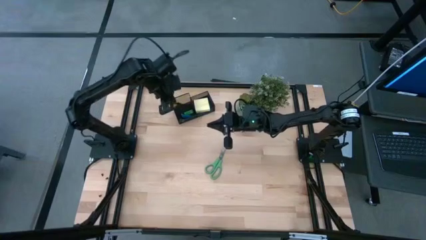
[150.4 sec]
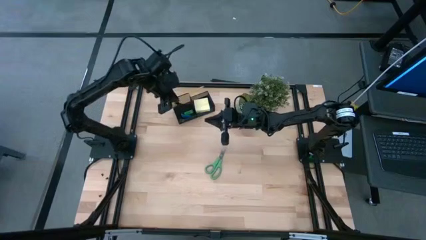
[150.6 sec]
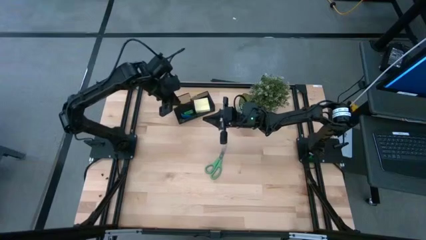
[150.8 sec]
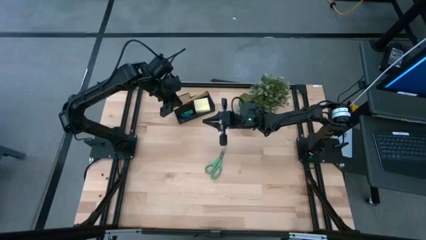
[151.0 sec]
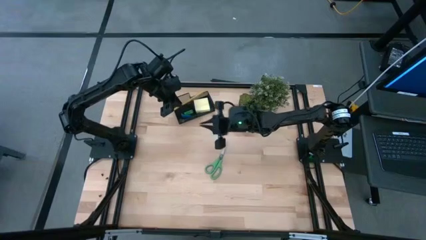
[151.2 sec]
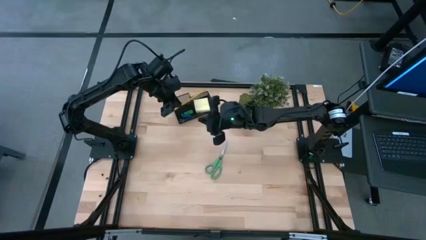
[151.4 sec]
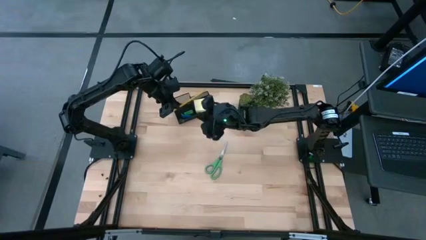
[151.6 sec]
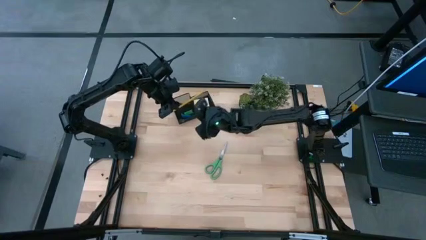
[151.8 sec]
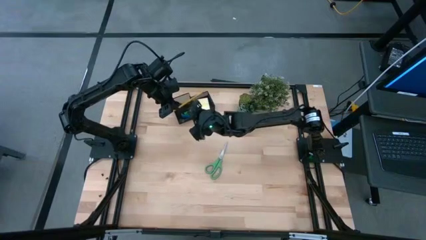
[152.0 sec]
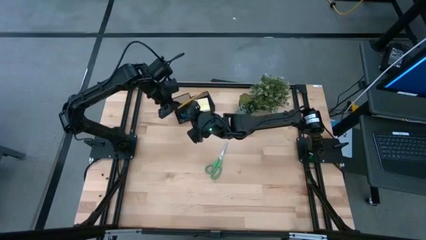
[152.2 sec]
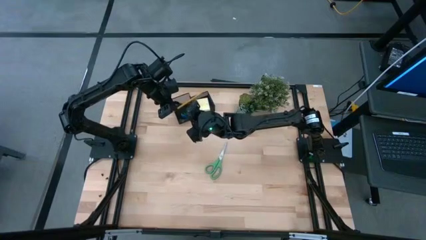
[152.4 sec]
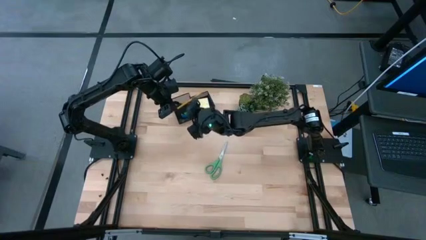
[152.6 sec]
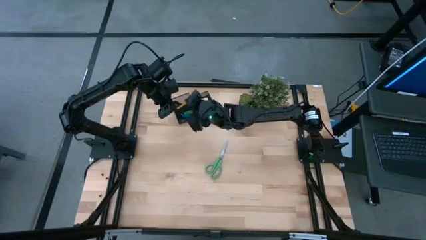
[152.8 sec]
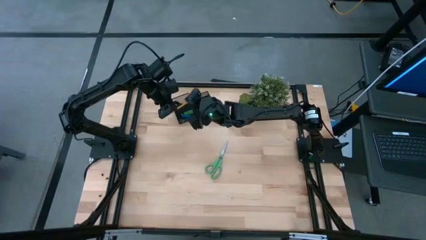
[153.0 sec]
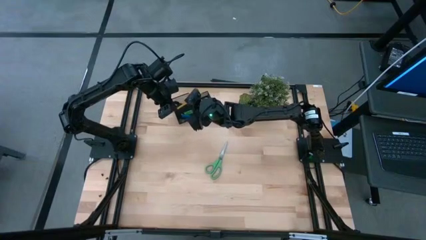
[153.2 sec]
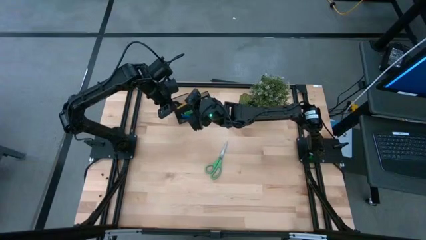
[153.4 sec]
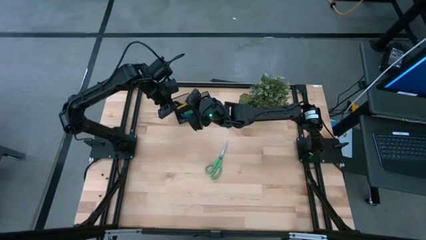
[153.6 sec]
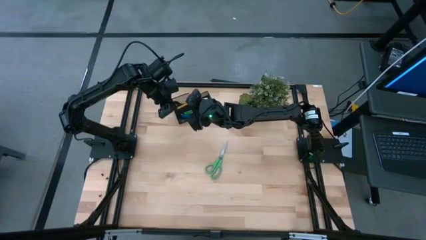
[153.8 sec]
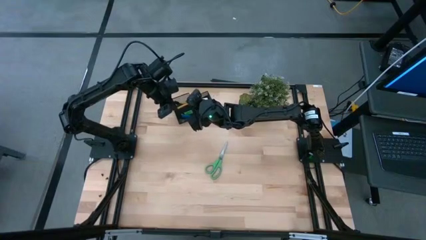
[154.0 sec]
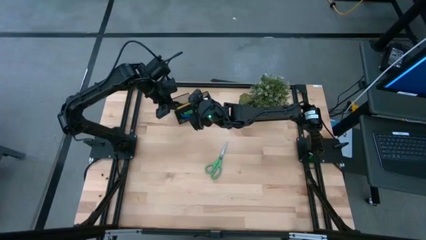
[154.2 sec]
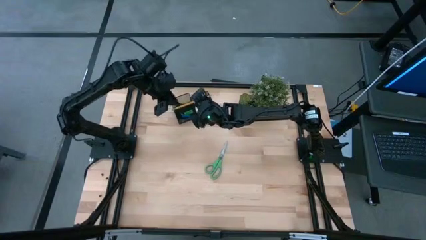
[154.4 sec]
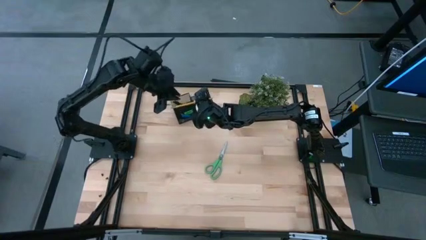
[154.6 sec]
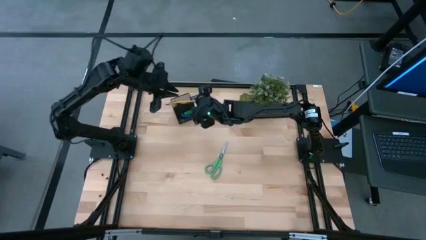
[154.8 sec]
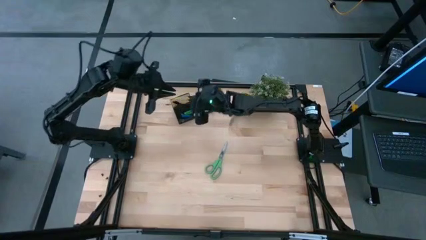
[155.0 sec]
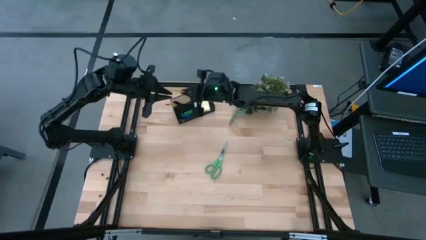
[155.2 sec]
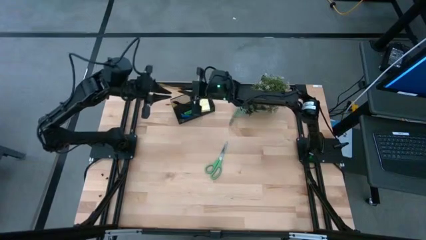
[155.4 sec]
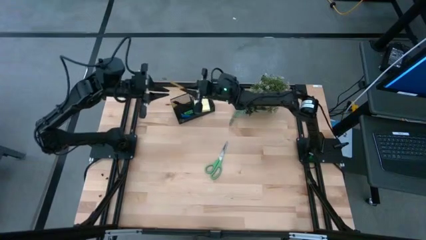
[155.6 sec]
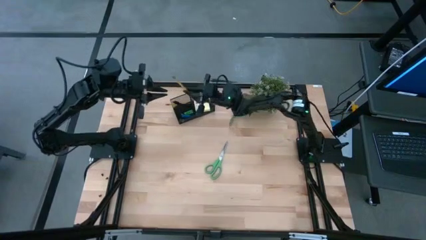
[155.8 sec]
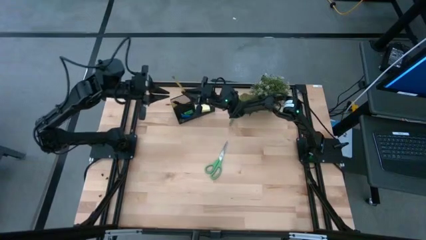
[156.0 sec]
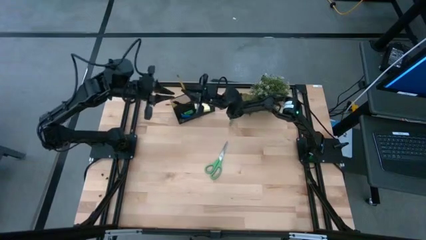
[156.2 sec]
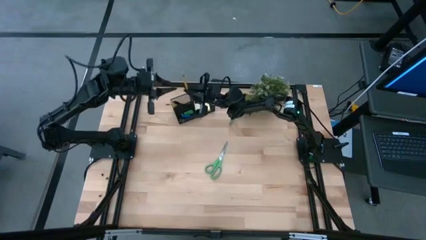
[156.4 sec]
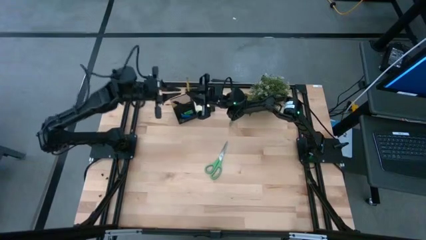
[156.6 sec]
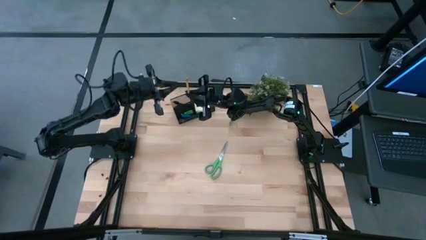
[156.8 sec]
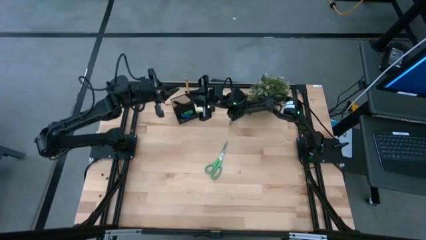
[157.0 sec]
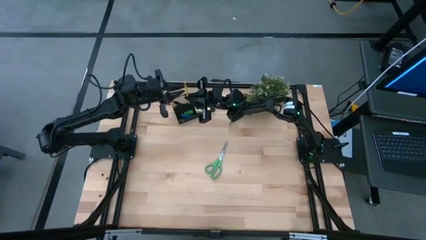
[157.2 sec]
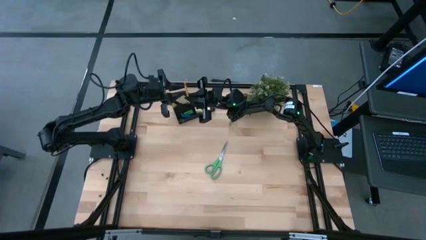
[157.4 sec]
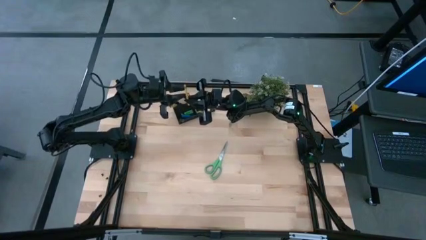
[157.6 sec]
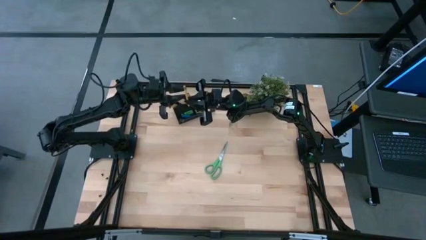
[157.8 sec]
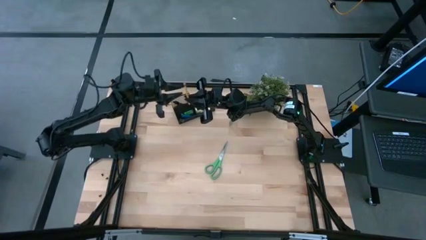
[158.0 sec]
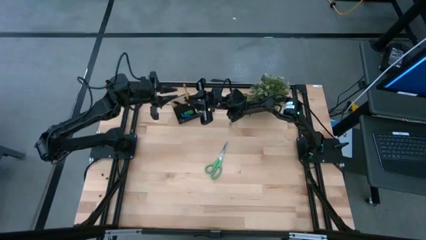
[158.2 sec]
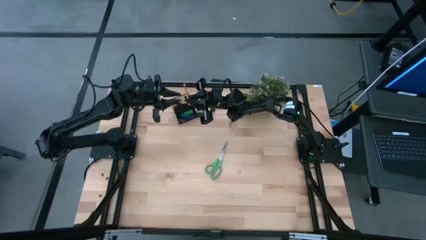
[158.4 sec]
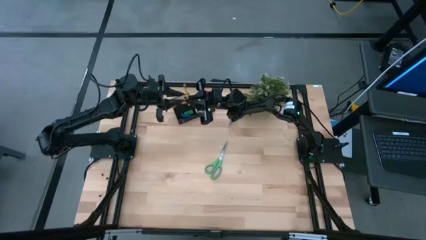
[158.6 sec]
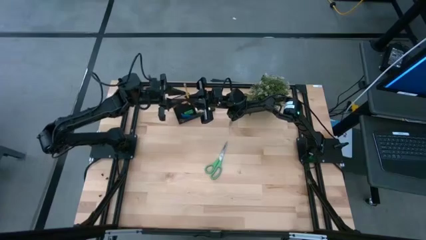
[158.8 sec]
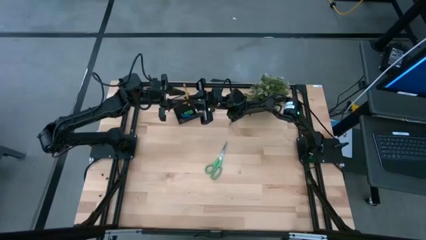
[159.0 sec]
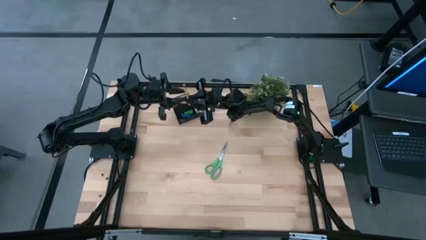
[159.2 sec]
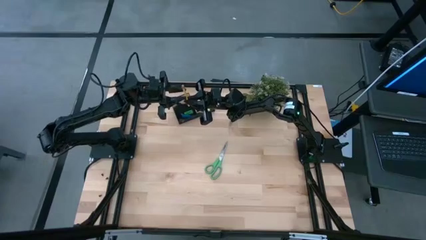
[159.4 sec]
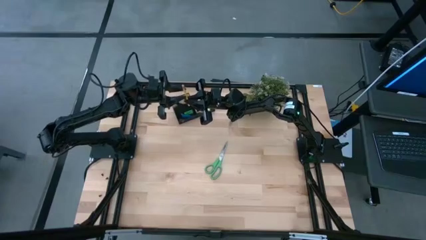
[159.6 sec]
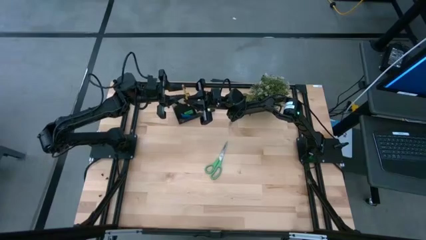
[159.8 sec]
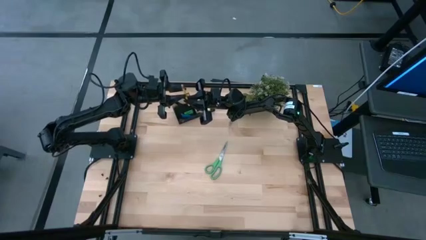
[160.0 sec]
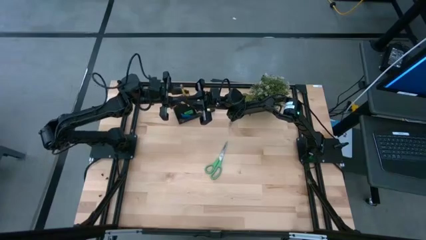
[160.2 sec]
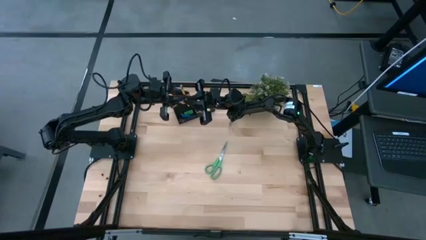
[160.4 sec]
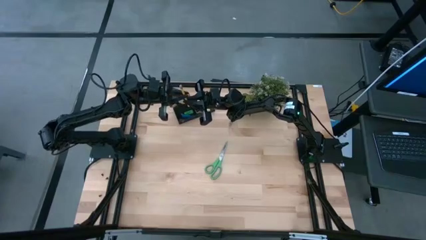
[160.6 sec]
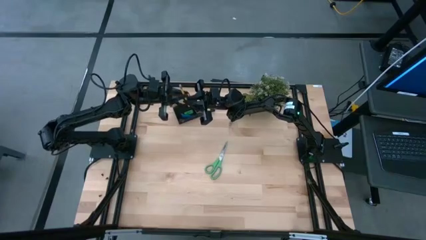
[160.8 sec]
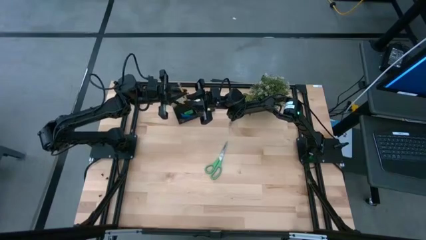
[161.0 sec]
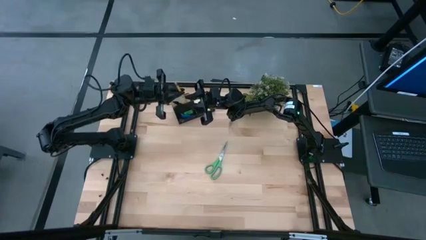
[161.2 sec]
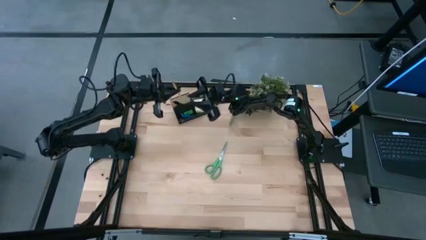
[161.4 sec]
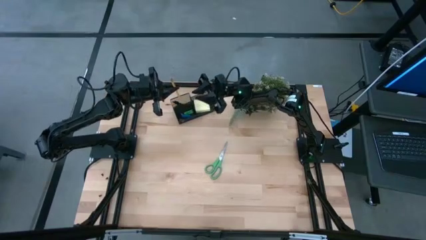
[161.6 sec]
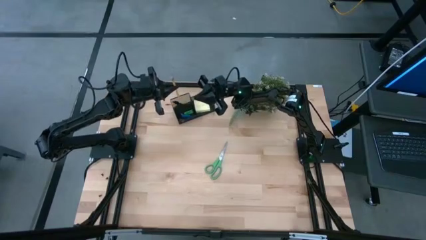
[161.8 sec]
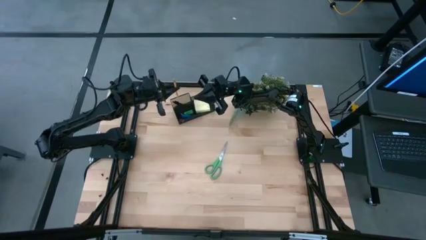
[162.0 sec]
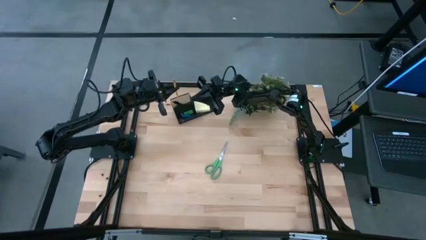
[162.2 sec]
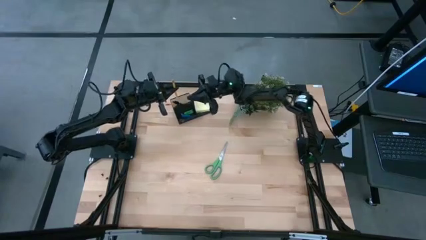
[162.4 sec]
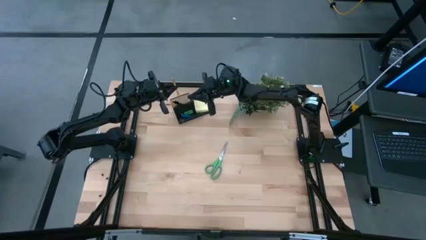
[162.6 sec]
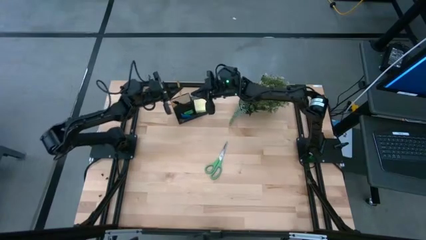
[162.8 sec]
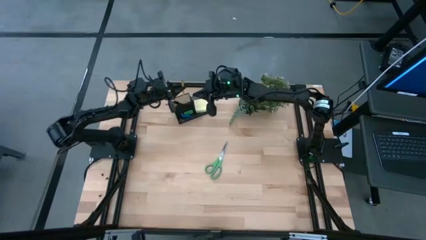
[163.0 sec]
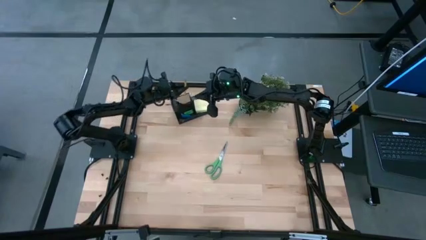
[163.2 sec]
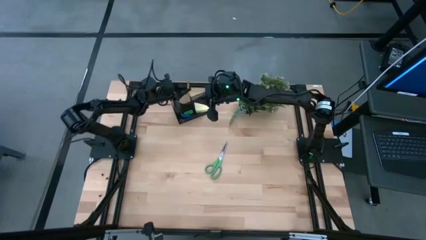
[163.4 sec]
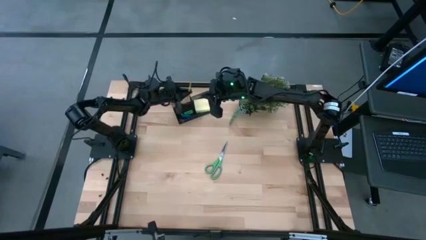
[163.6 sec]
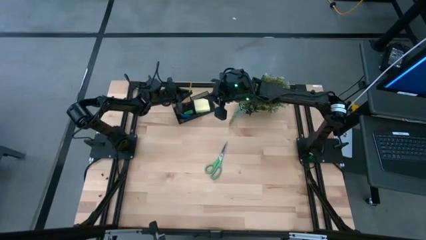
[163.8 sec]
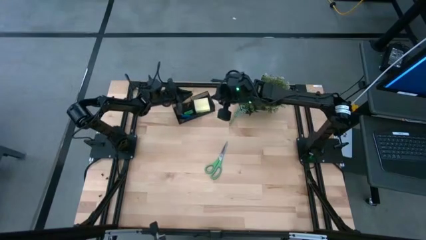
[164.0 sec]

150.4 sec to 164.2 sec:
Task: Pick and place office supplies into organizer
Put the yellow pencil into the black desk organizer

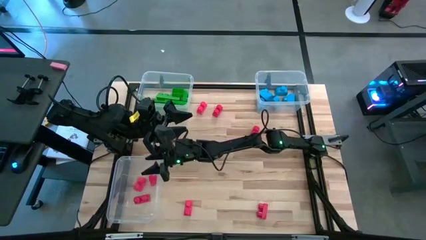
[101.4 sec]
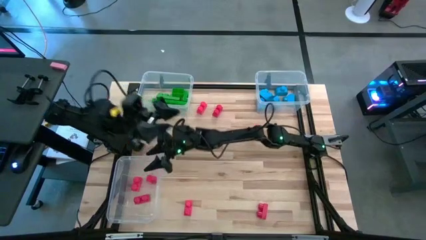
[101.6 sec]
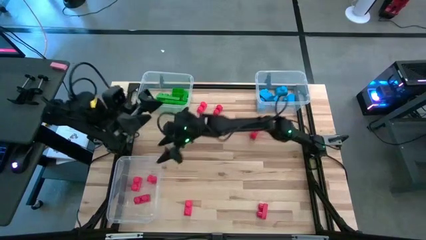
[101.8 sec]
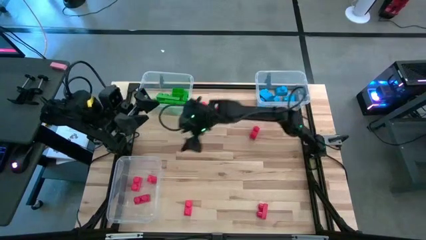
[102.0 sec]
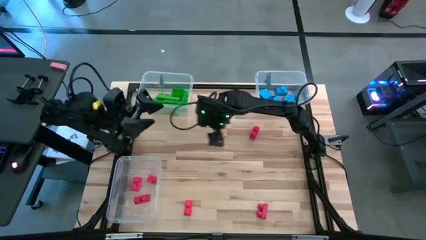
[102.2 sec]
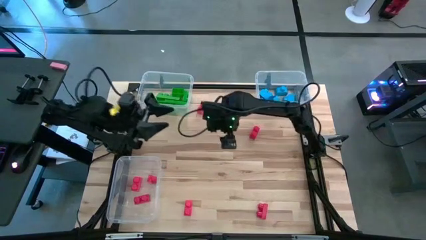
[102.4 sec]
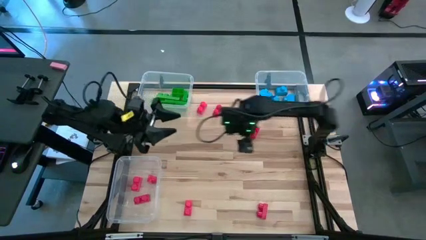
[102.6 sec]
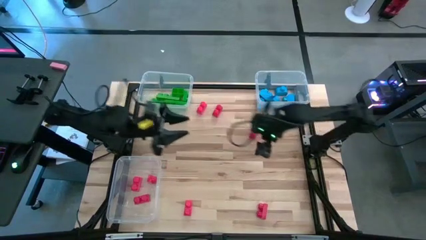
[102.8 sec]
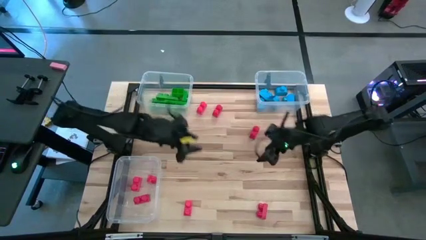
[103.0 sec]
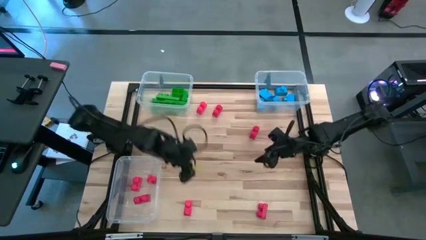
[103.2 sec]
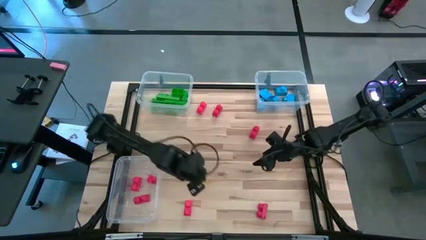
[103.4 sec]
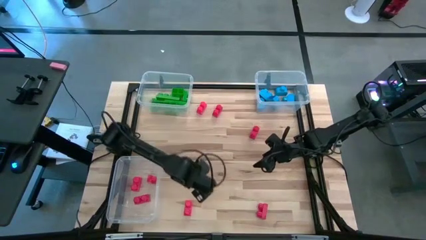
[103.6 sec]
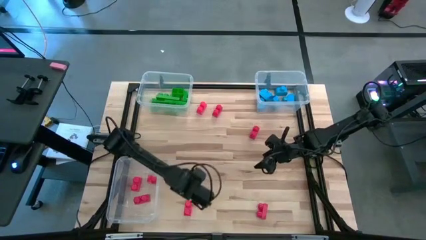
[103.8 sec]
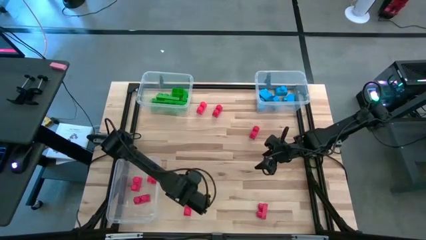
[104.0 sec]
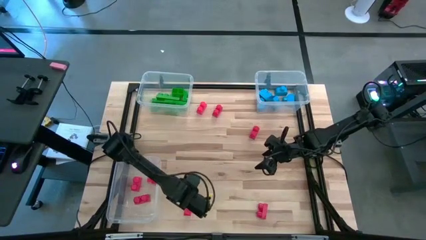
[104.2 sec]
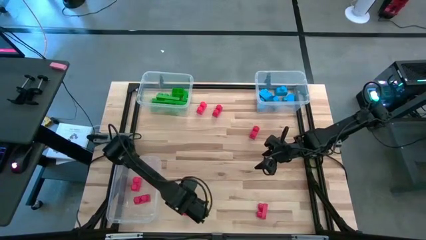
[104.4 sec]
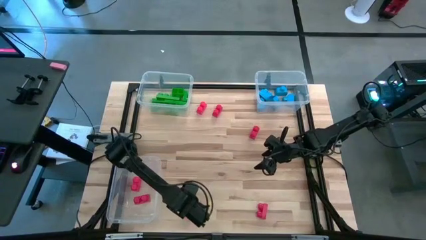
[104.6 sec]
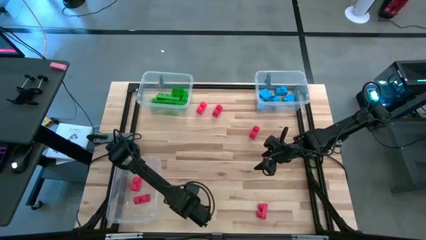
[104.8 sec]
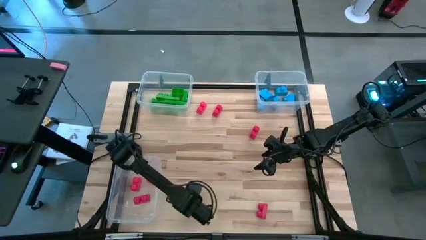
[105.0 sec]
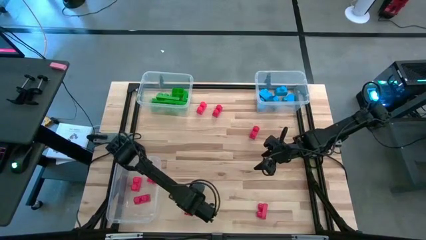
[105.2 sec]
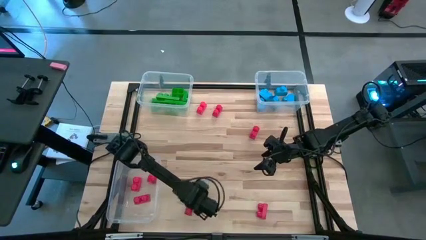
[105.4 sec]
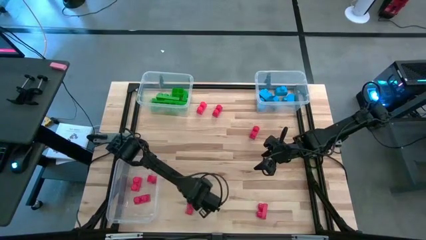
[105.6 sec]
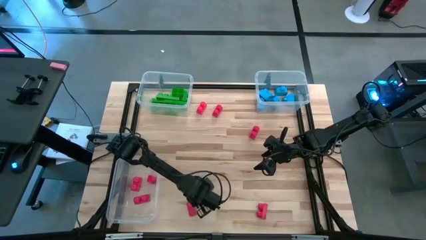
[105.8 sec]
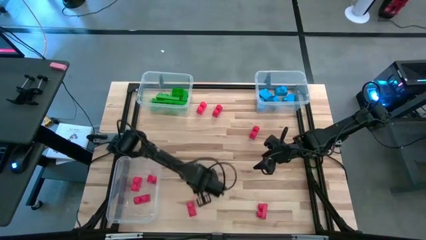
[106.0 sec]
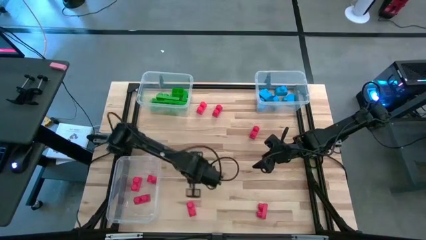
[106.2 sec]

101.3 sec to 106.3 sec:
Task: Sort blocks
Put the red game piece into the bottom left transparent bin
